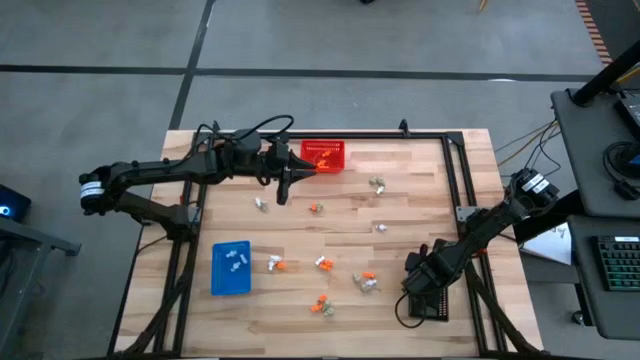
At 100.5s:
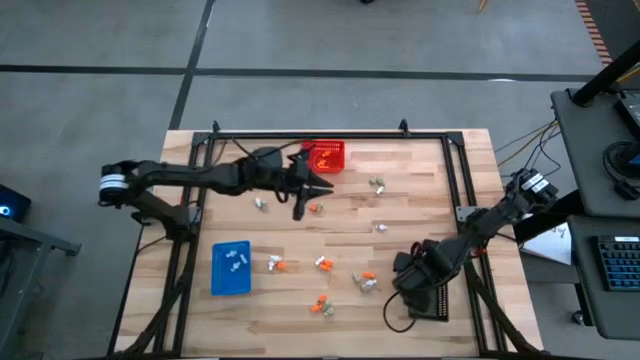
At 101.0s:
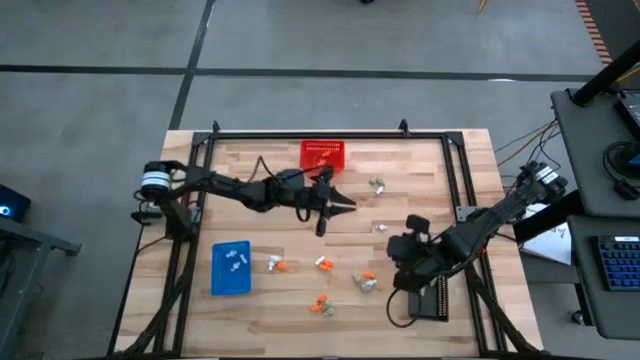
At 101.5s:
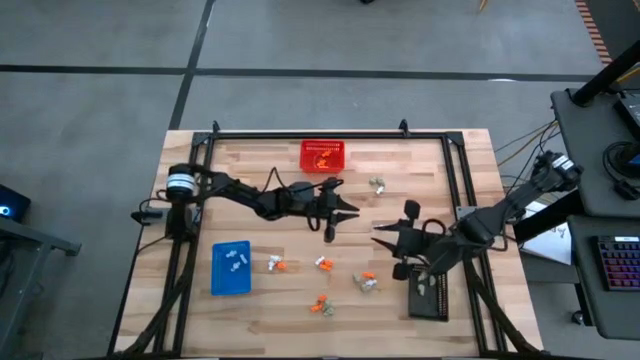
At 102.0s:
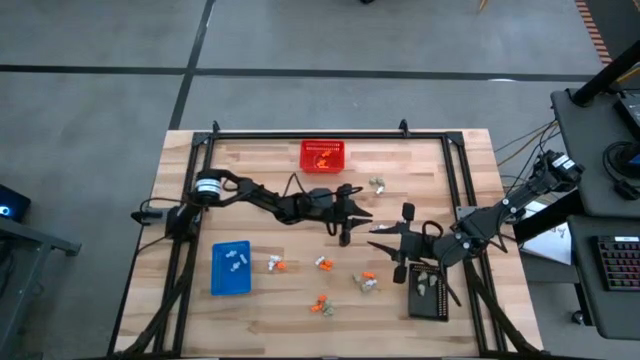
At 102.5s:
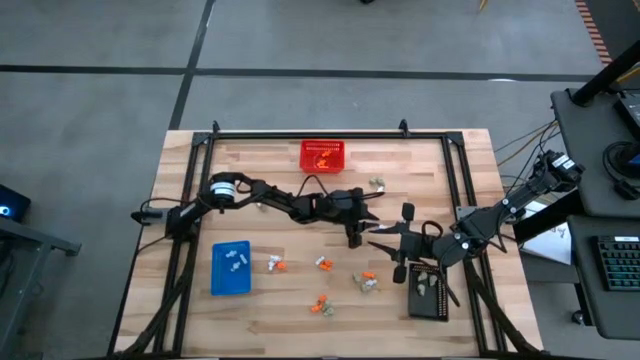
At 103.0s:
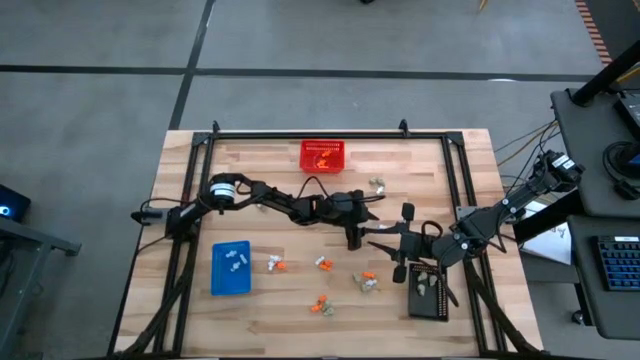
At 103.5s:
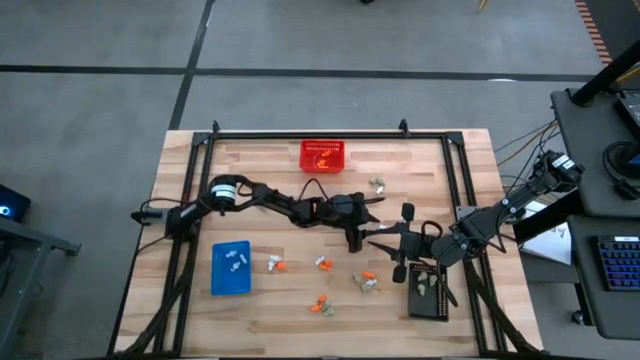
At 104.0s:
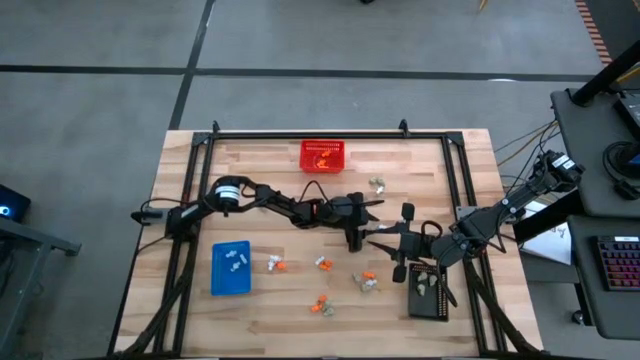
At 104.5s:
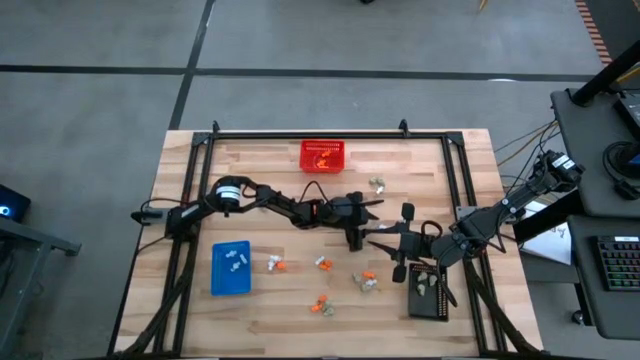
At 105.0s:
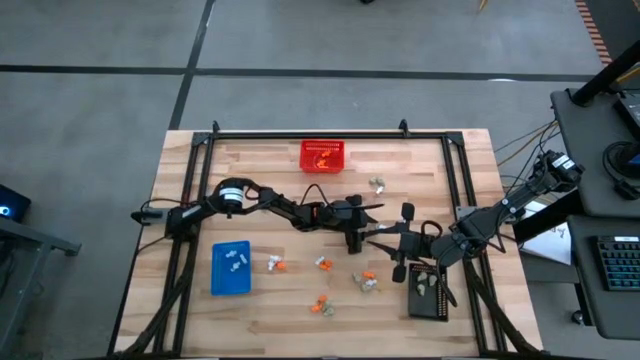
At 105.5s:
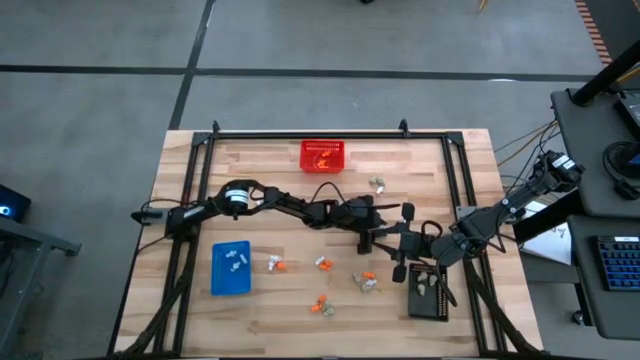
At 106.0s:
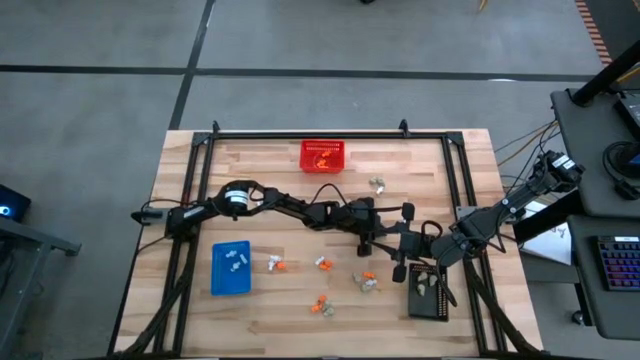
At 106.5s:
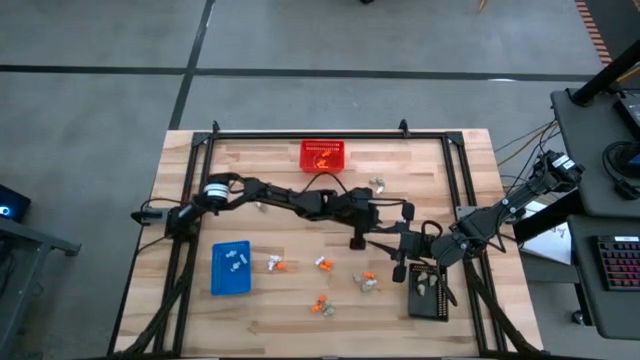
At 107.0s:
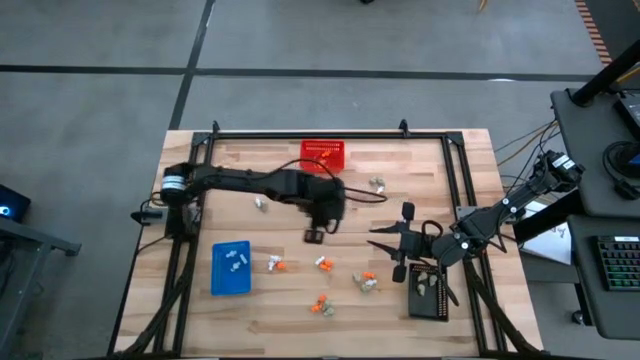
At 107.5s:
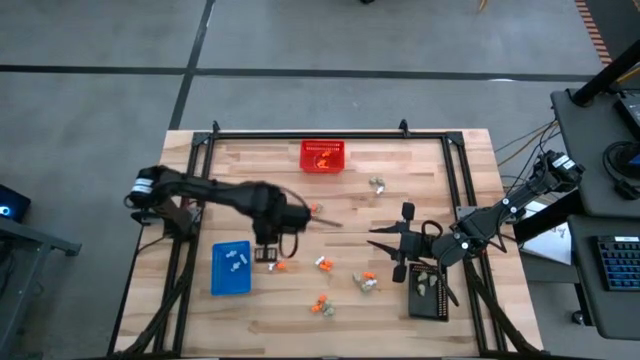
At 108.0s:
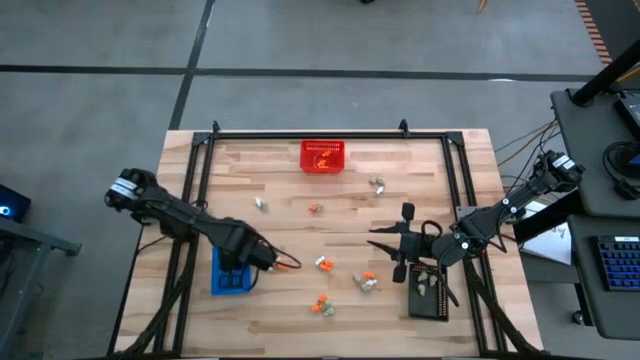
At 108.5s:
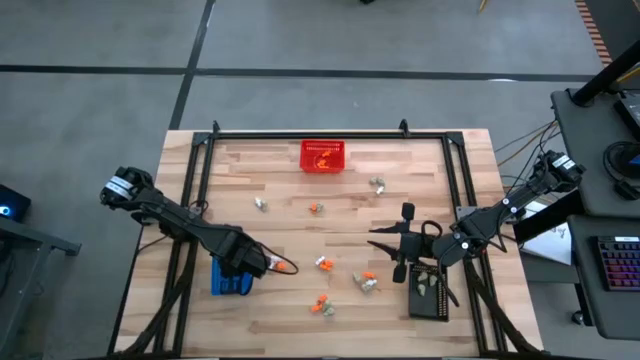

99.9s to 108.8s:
Task: Sort Halloween decoration
Put the white skeleton toy into the blue bin

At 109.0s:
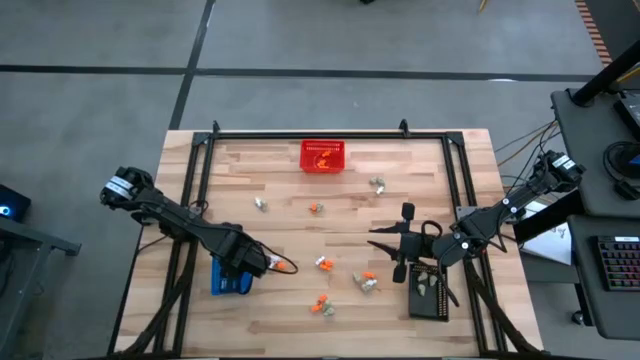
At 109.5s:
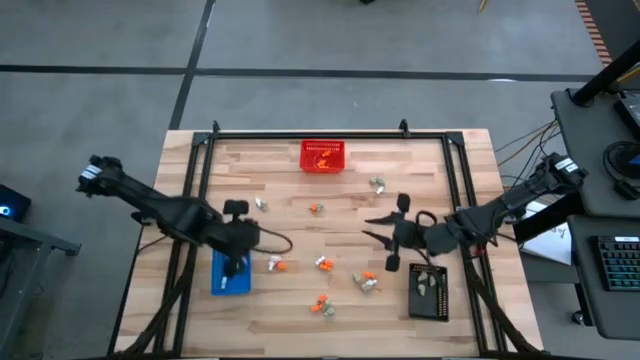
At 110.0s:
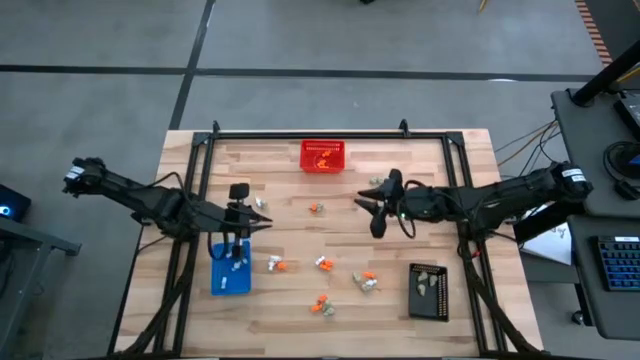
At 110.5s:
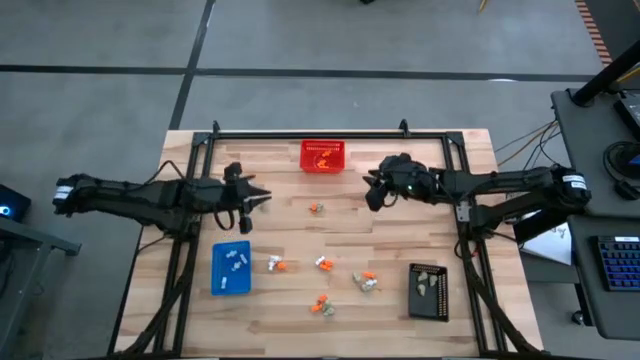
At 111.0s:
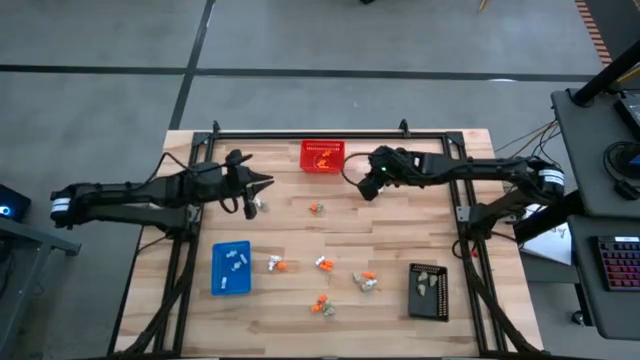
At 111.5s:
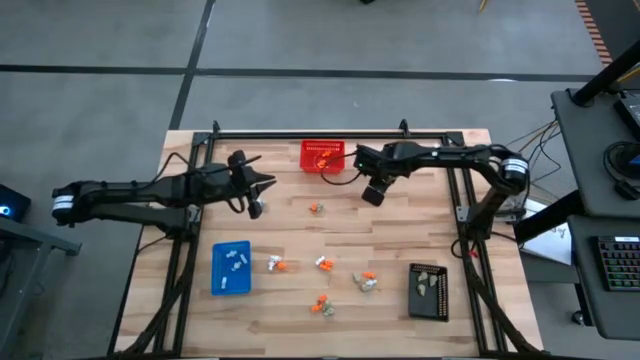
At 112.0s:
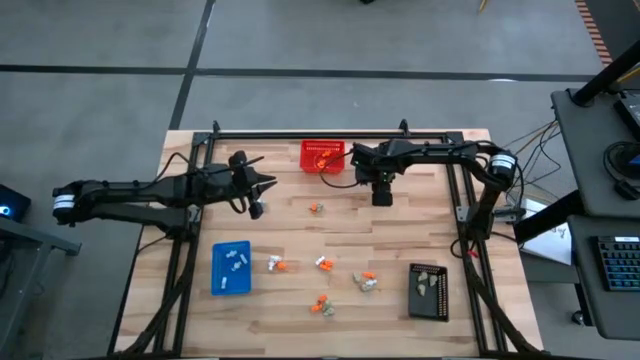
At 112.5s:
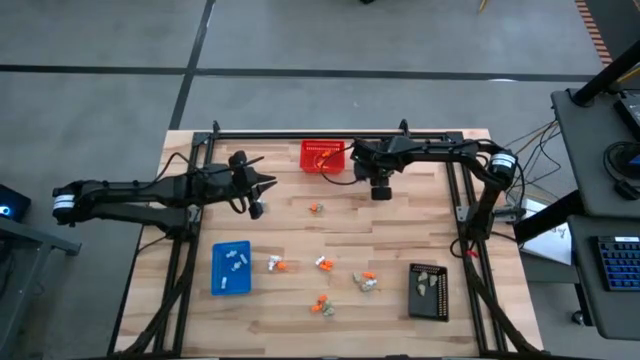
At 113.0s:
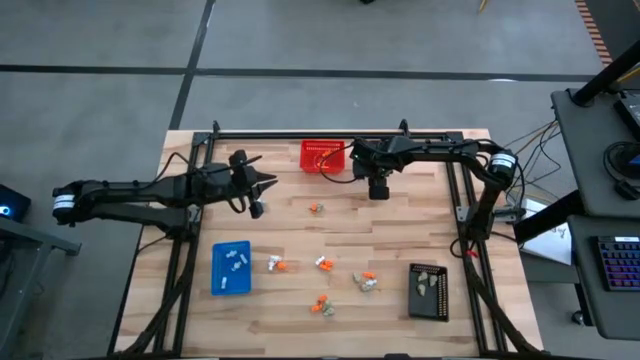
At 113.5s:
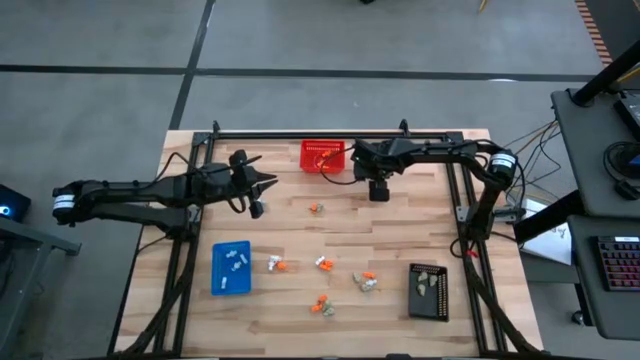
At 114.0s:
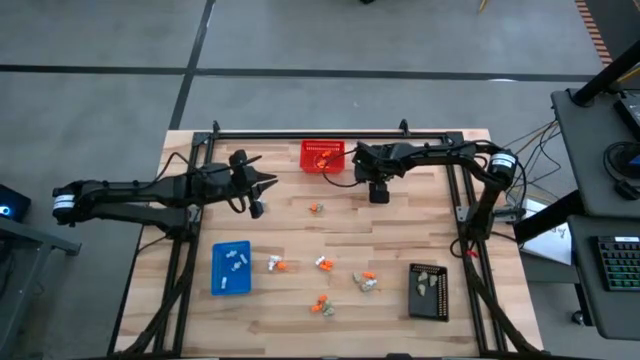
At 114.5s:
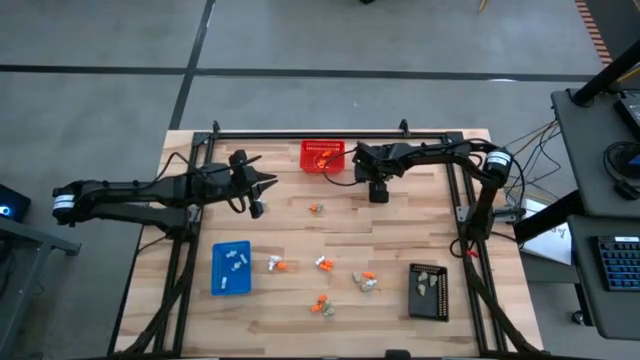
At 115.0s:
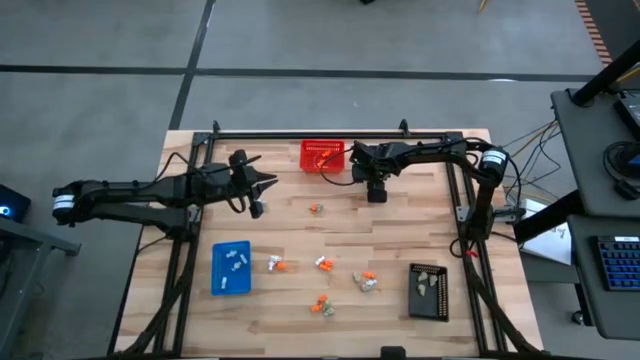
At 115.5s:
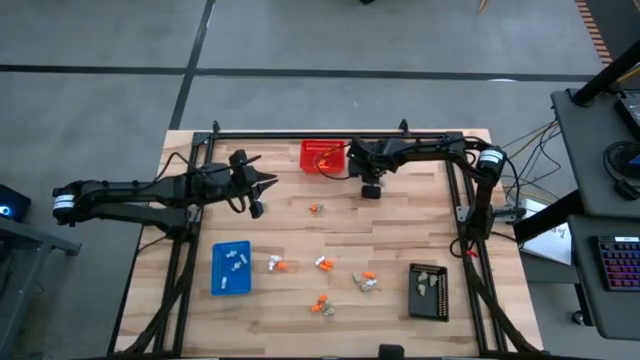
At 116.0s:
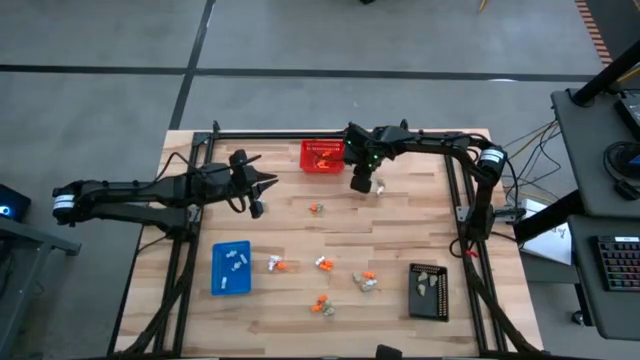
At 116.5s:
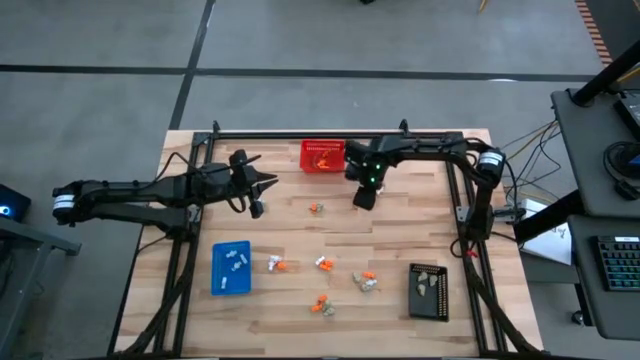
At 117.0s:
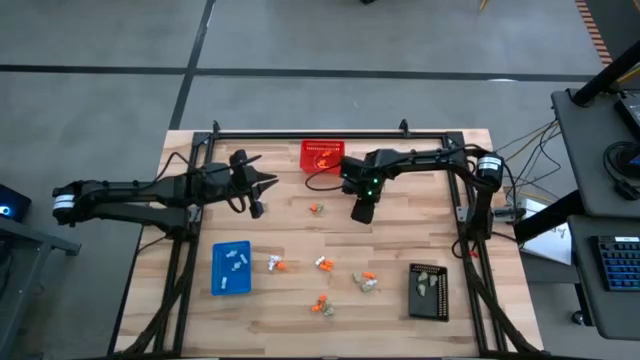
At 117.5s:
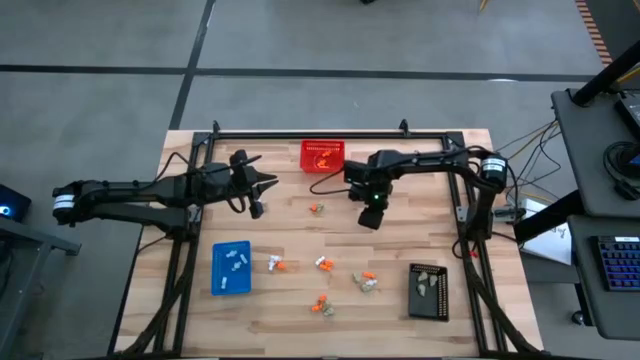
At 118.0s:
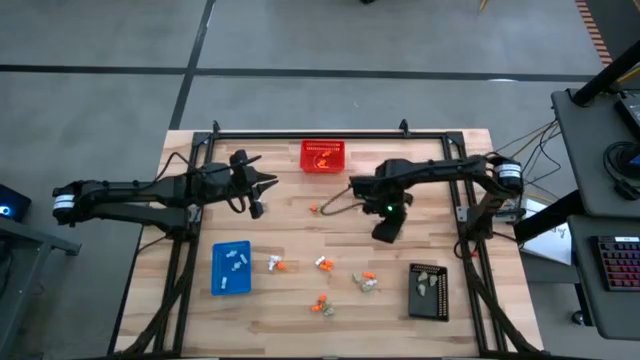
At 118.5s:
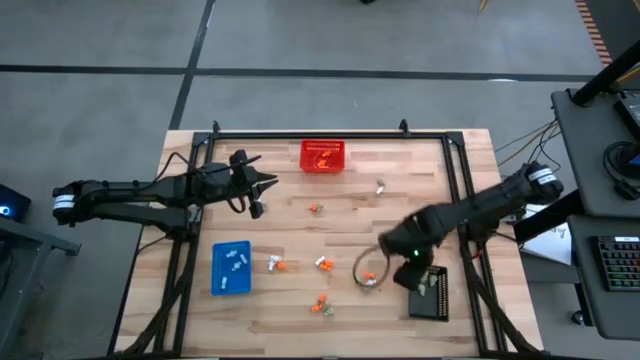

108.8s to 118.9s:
Put the gray skull toy into the black bin

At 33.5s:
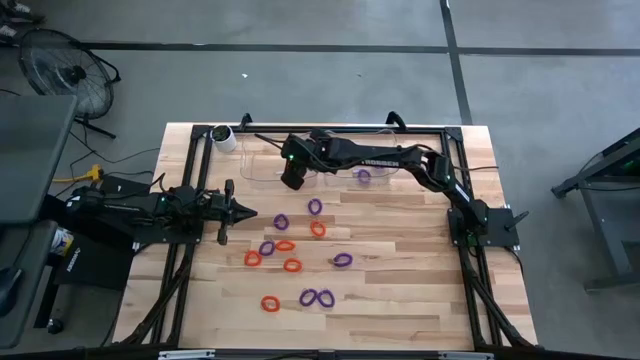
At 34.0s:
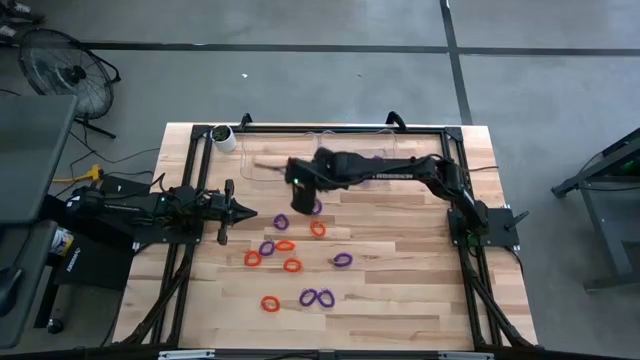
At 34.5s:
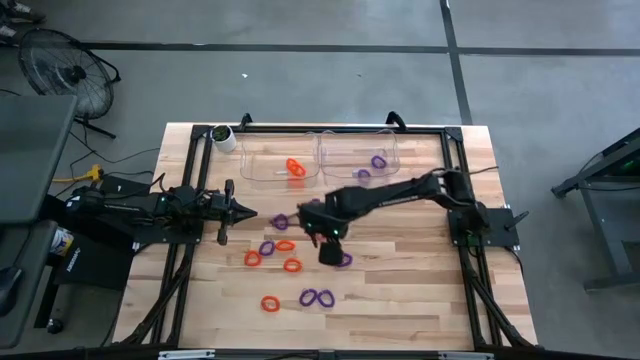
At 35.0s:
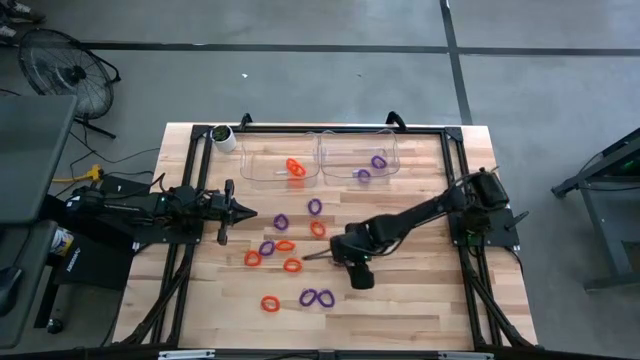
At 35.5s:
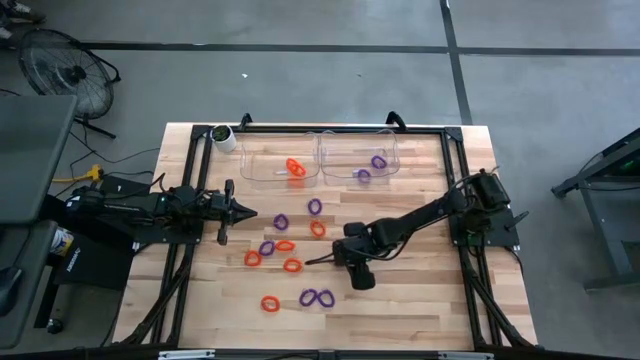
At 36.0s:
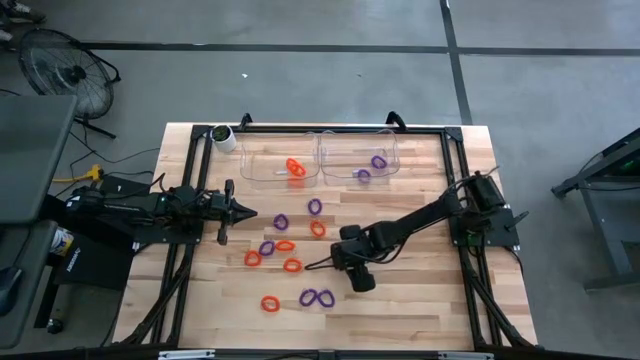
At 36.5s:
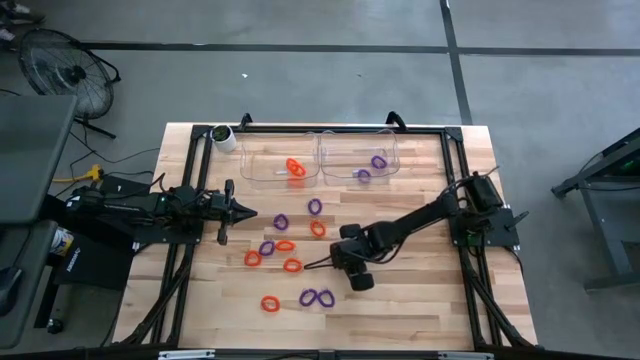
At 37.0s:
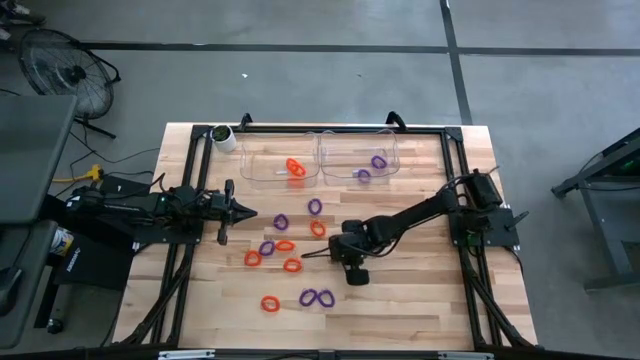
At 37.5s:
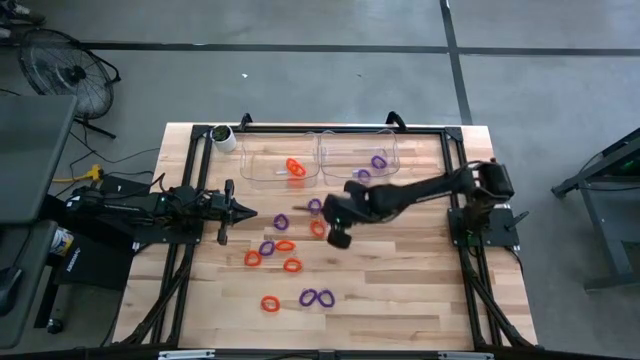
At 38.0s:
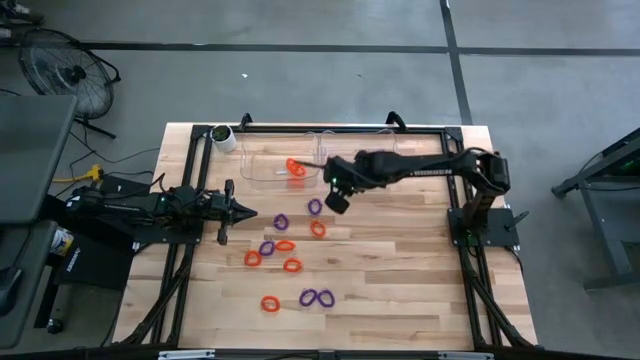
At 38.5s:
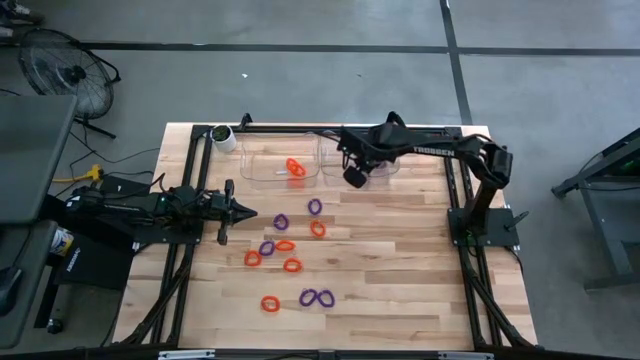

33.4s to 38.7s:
Task: Sort spring keychains
Put the violet spring keychain into the right bin
